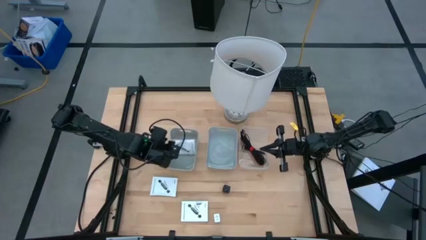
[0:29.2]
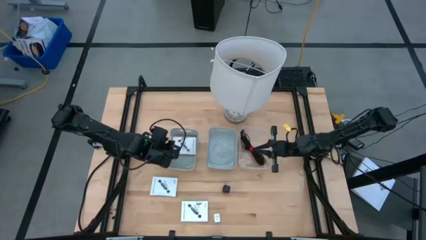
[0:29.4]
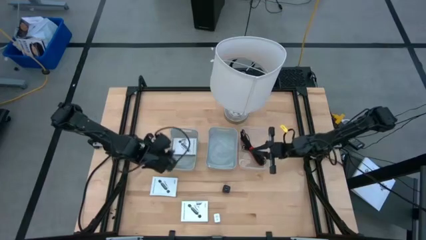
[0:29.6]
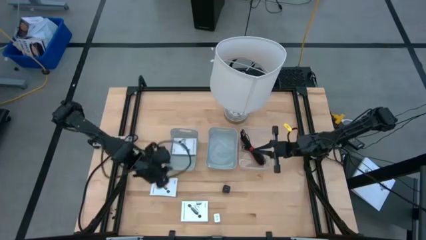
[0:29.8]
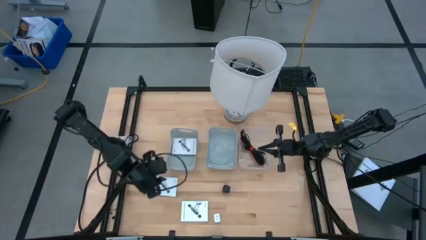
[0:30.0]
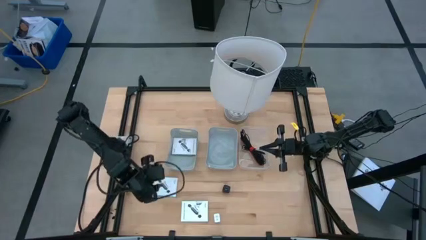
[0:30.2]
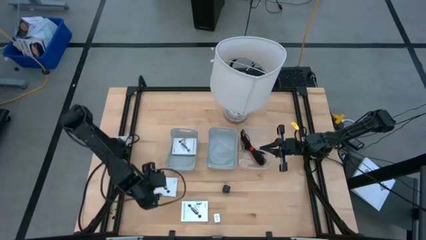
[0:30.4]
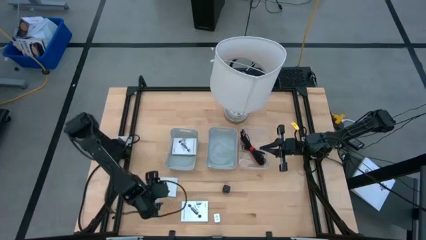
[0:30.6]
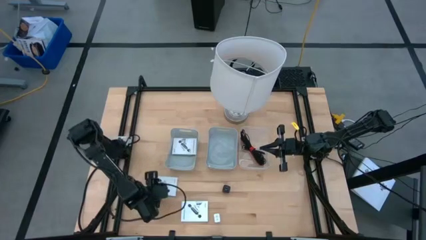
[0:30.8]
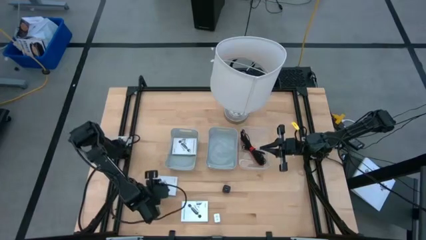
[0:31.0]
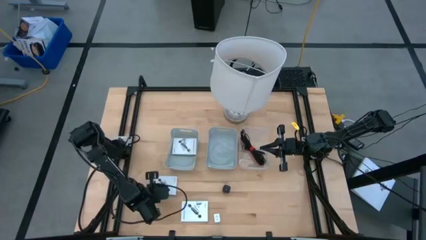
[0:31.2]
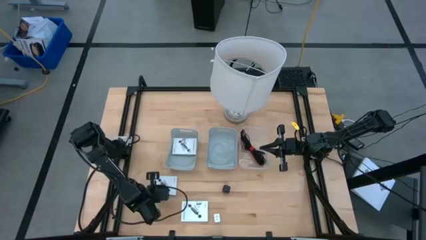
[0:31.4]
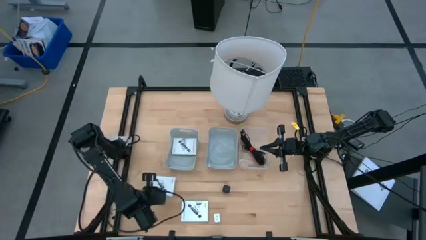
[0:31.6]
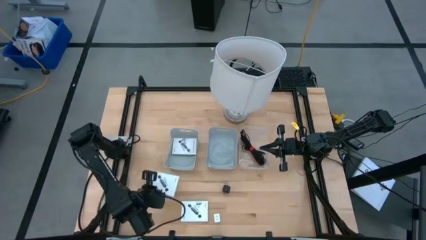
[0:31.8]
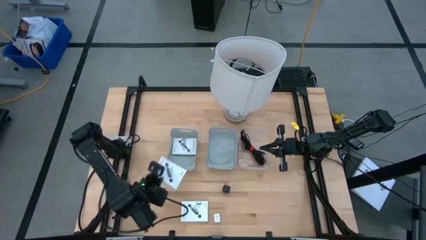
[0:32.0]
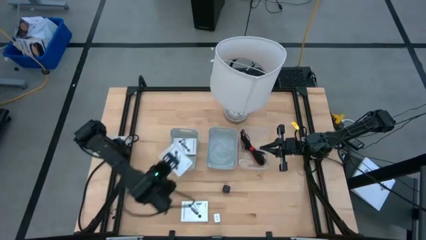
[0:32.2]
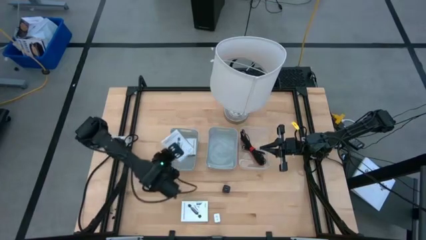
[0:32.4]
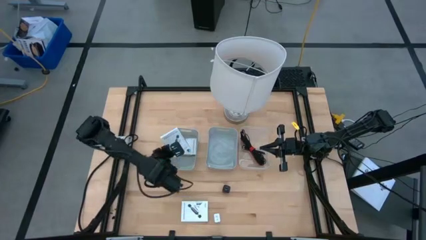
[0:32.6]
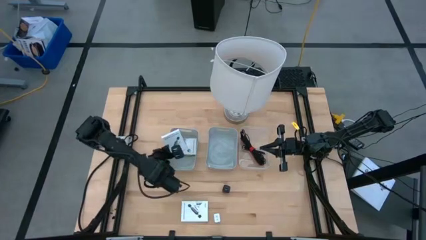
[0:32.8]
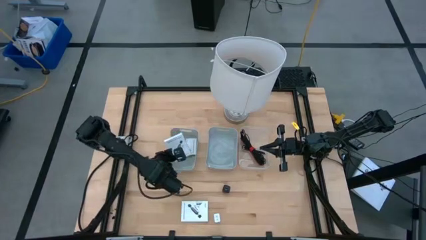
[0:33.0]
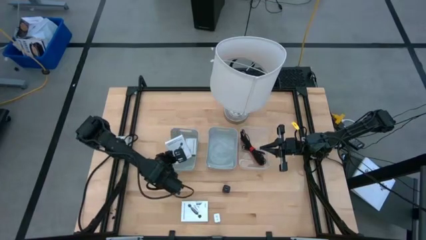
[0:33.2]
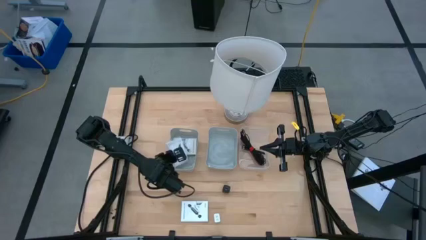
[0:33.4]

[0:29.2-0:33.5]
Task: Pick and place items into bin
Put the top card reader box into the left gray bin

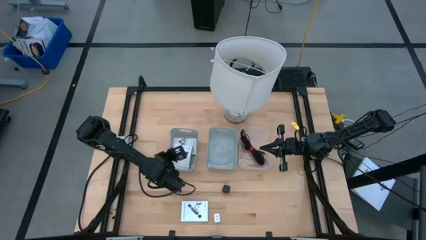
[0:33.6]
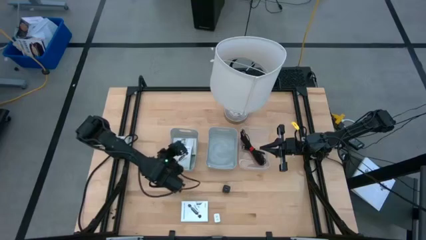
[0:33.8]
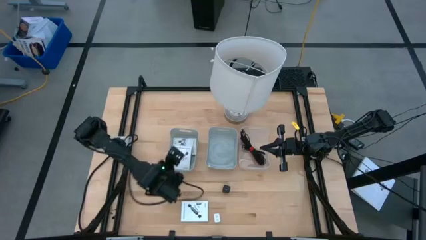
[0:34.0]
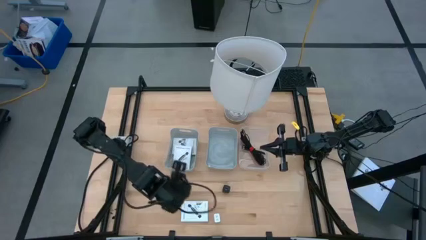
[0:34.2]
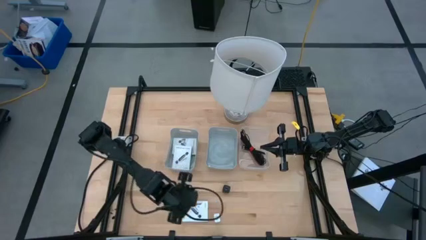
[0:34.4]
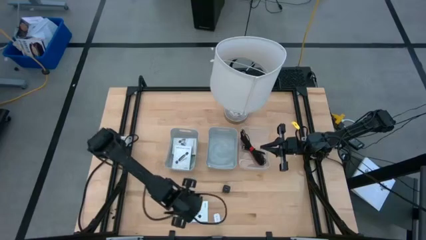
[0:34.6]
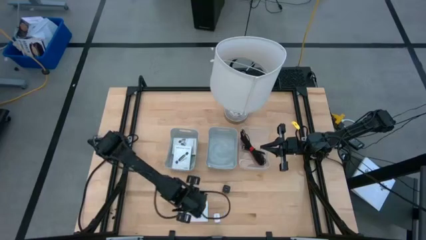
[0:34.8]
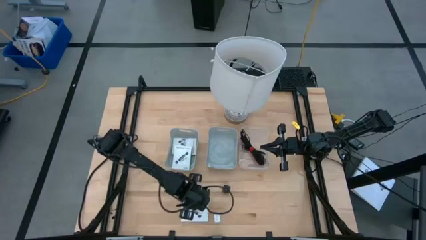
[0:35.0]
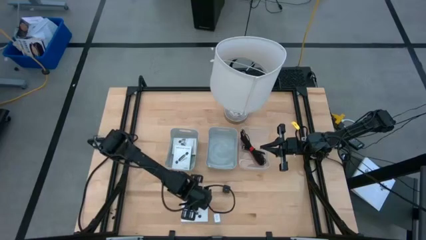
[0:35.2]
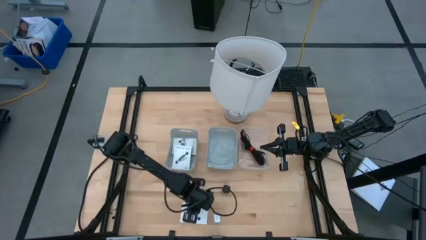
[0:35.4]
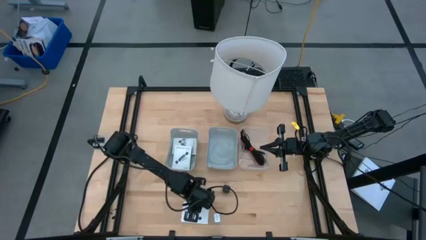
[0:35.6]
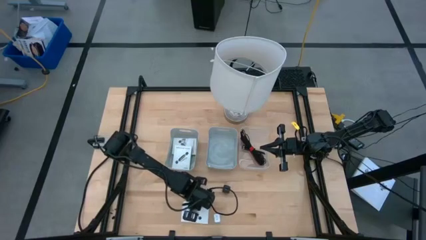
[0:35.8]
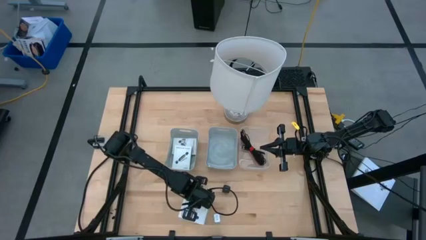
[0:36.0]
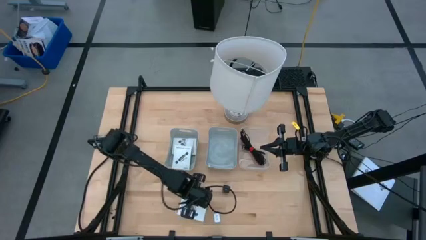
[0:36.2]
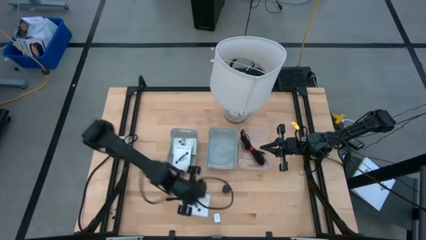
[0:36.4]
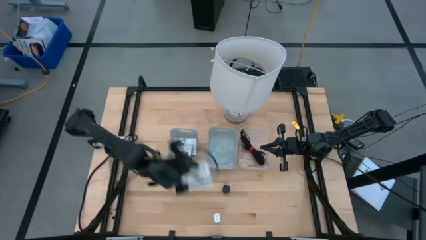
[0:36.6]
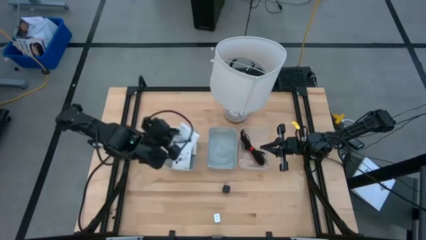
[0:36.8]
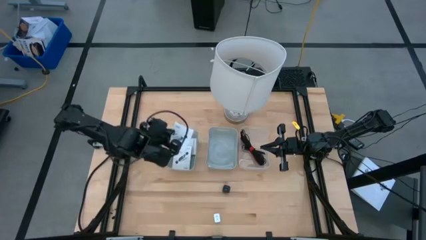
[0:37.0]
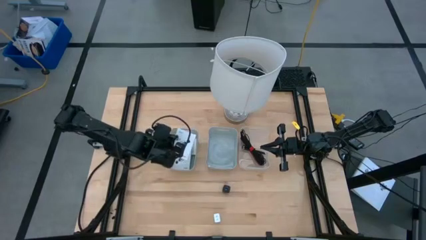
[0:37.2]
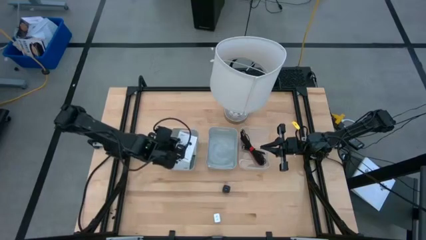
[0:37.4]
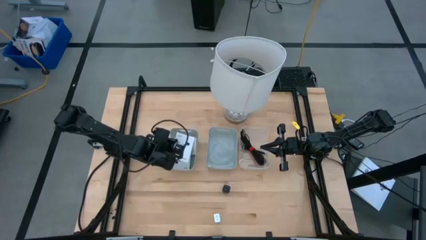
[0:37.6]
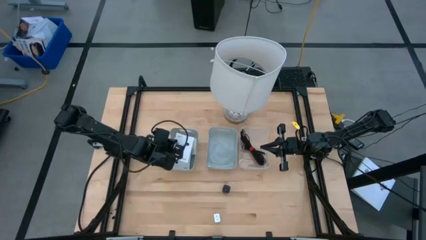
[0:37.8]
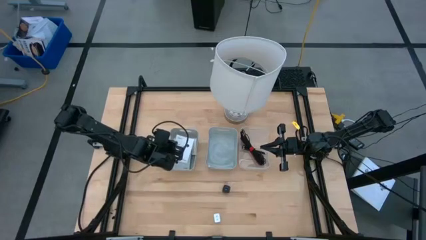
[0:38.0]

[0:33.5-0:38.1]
Put the card reader box into the left gray bin

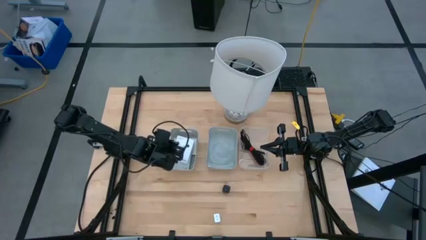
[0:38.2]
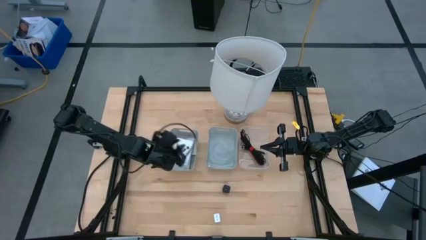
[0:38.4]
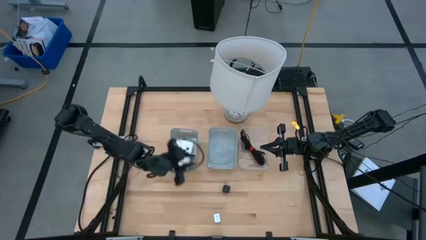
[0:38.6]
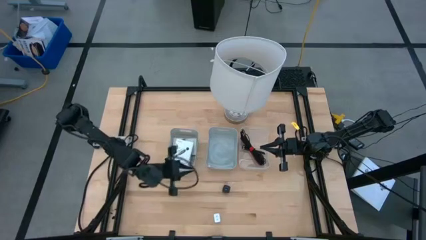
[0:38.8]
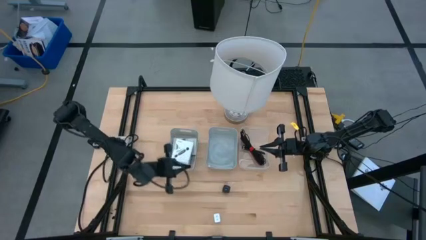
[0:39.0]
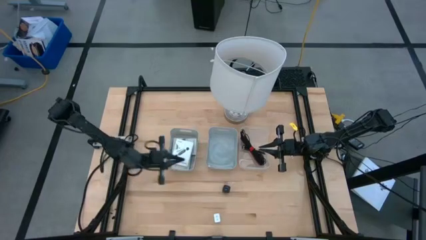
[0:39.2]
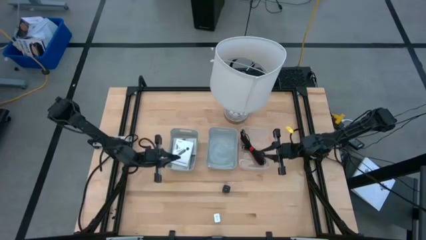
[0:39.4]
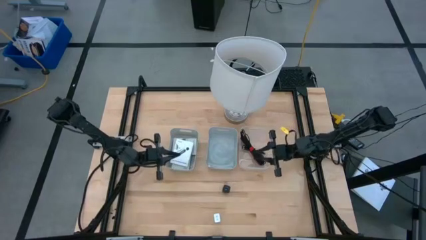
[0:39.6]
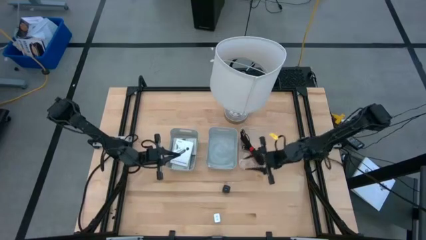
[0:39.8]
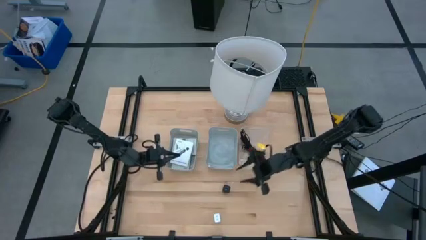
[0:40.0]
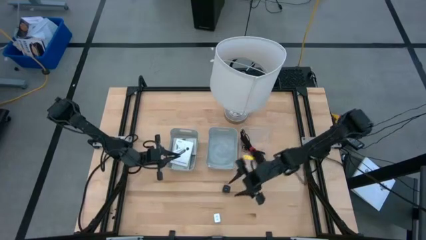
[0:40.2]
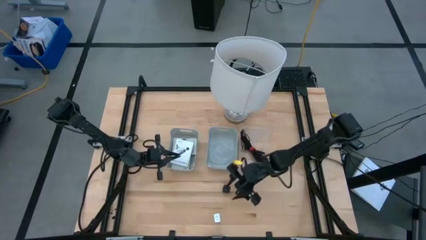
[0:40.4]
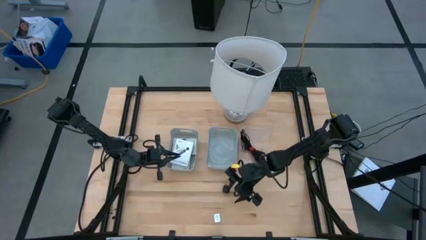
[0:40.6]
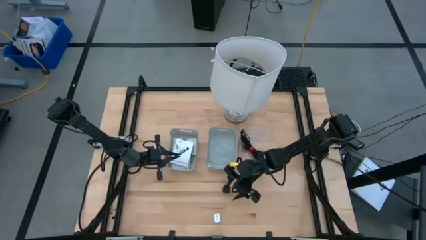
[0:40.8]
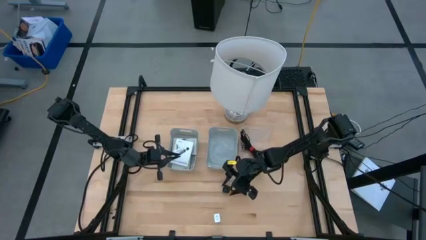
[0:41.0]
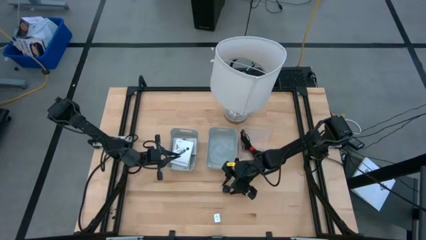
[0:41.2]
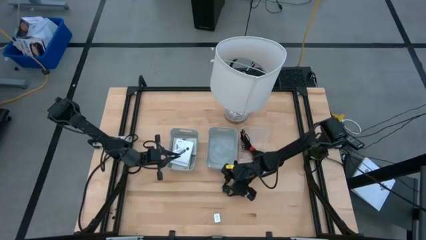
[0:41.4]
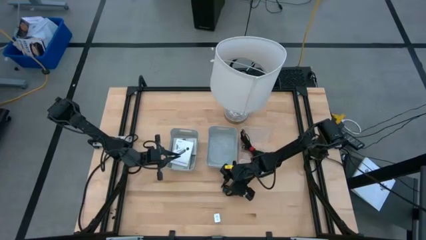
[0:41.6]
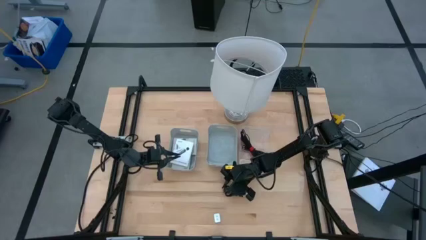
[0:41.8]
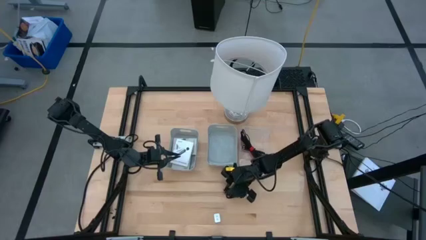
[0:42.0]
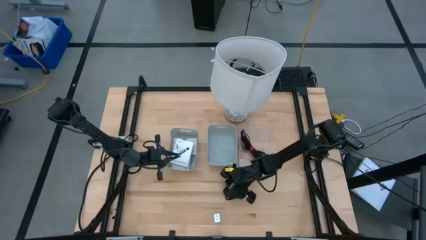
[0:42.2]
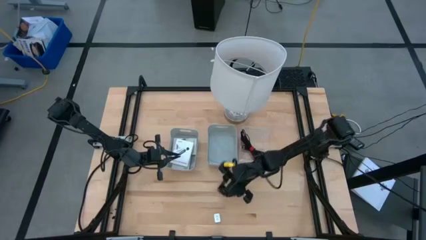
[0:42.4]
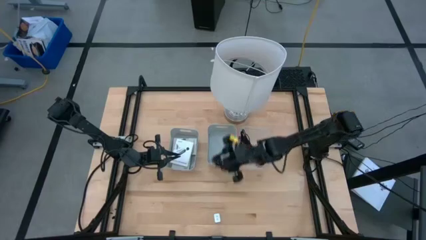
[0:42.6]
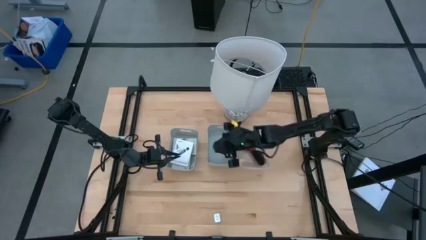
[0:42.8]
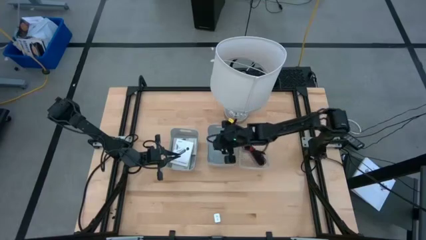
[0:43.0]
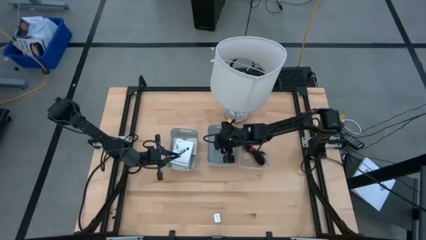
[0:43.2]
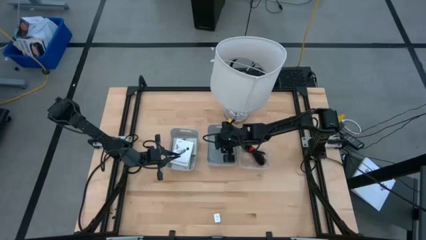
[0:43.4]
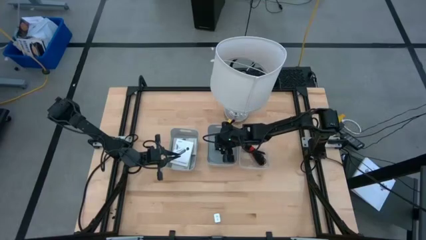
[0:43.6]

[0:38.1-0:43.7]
Put the black charger adapter into the right gray bin

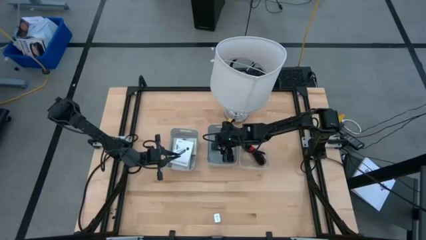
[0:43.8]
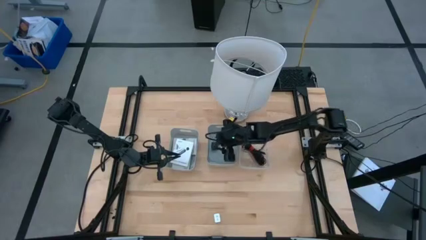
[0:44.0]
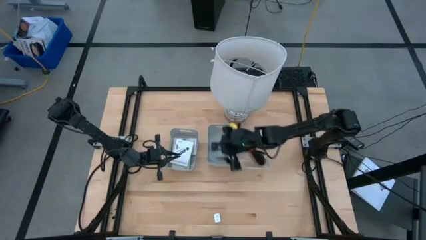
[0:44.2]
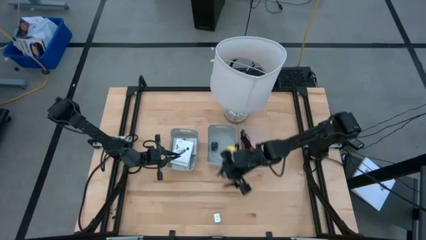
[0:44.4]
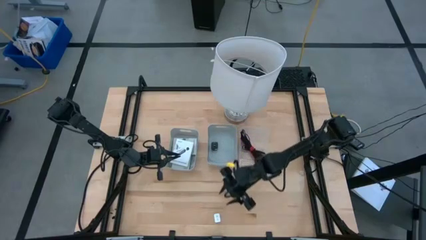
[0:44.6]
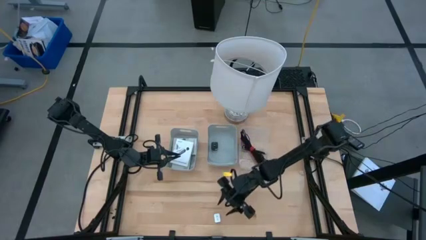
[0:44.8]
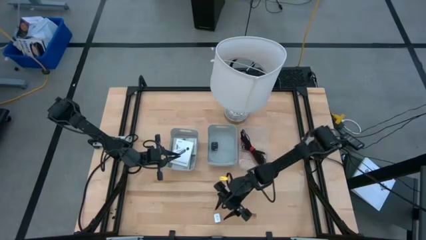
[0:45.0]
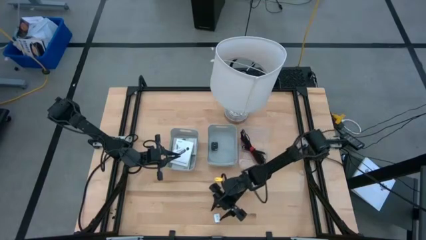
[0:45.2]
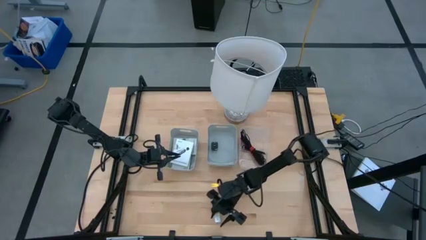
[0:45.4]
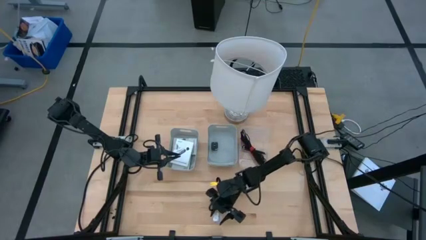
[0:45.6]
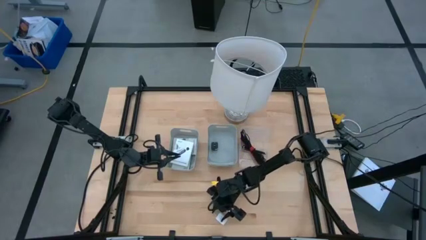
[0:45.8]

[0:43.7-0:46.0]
Put the white charger adapter into the right gray bin
